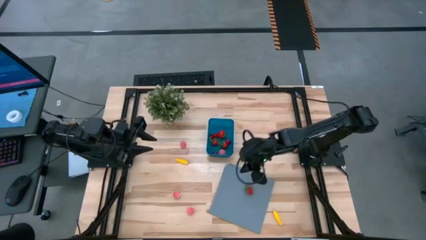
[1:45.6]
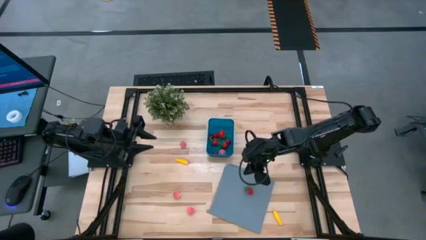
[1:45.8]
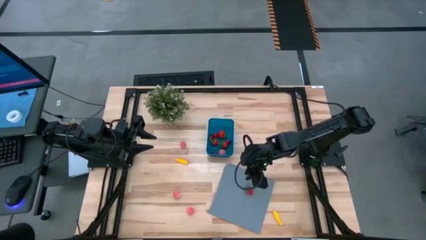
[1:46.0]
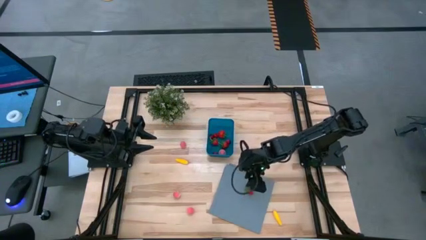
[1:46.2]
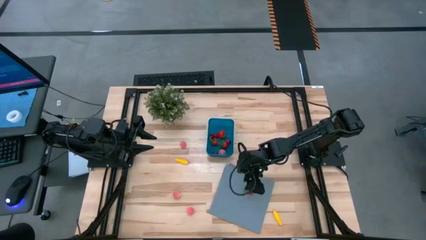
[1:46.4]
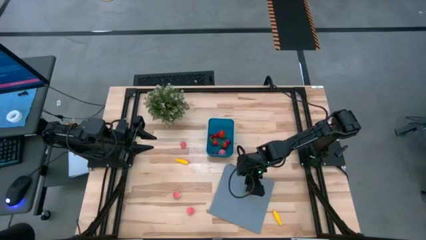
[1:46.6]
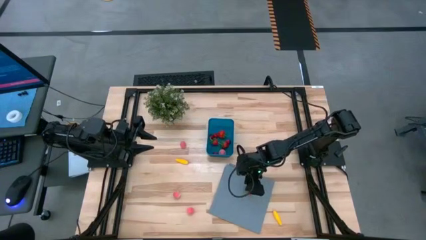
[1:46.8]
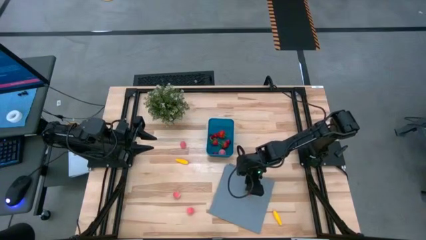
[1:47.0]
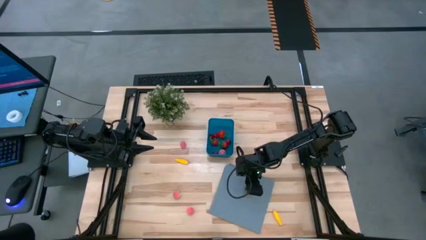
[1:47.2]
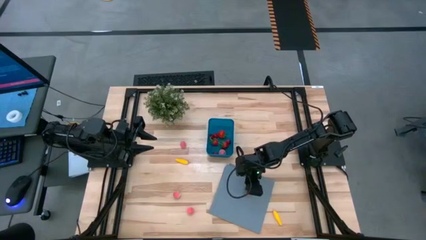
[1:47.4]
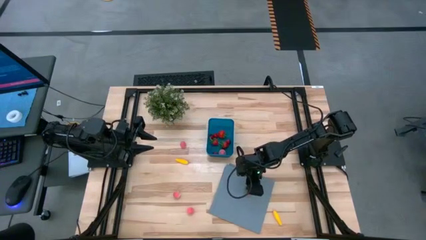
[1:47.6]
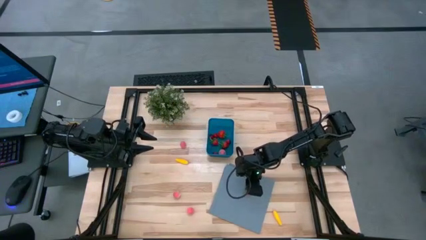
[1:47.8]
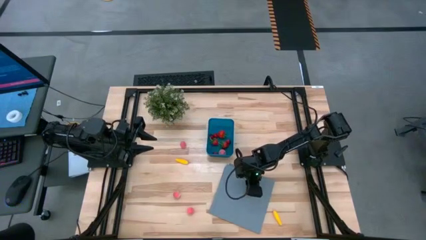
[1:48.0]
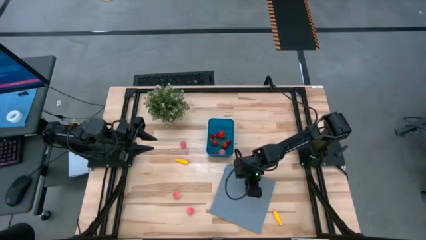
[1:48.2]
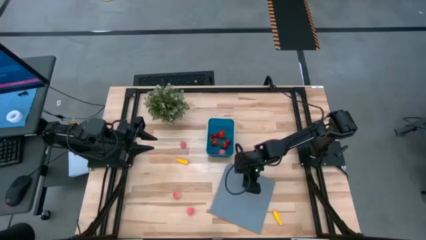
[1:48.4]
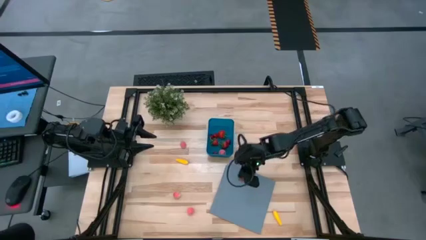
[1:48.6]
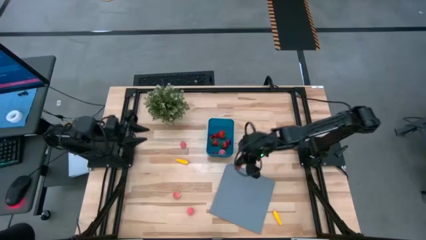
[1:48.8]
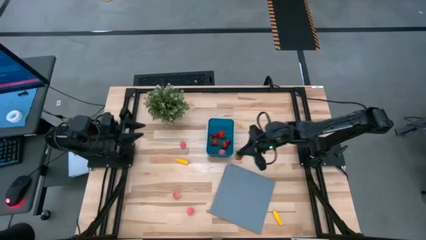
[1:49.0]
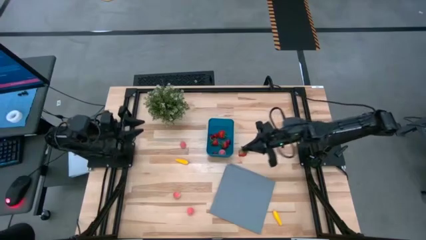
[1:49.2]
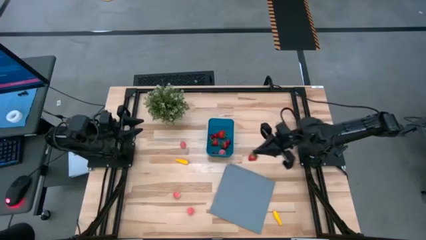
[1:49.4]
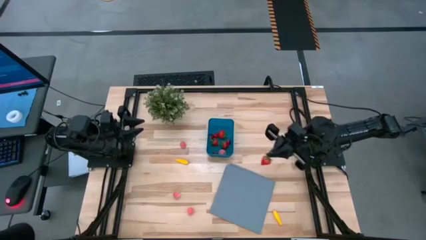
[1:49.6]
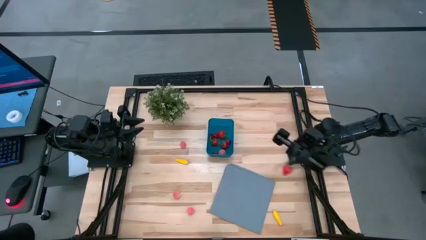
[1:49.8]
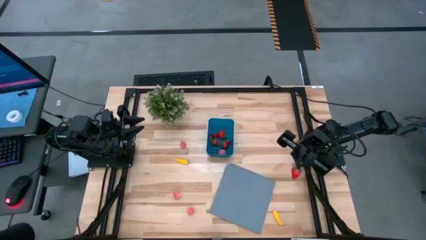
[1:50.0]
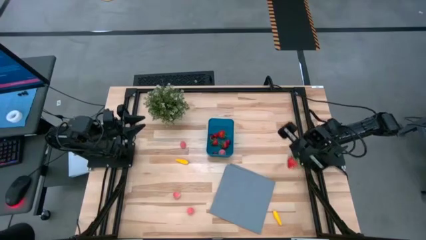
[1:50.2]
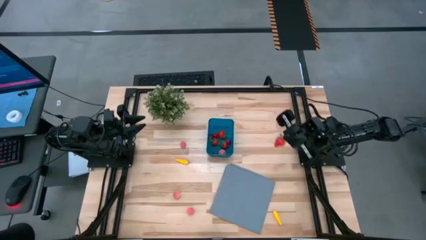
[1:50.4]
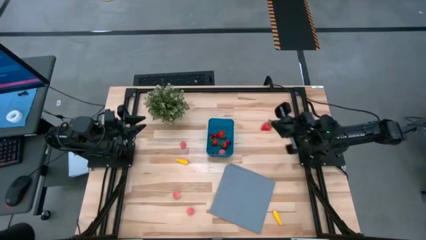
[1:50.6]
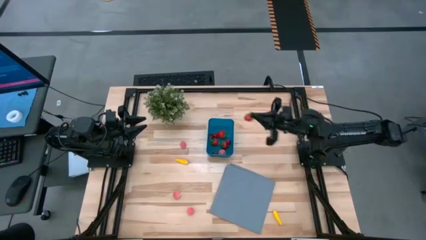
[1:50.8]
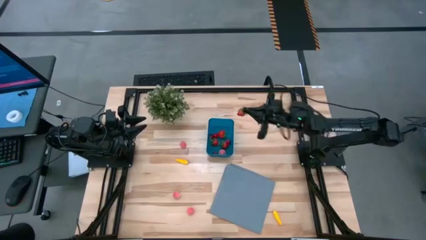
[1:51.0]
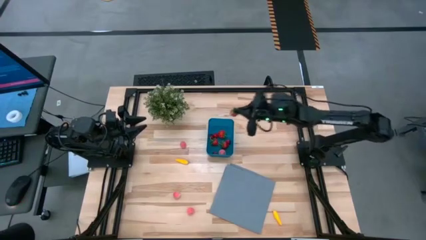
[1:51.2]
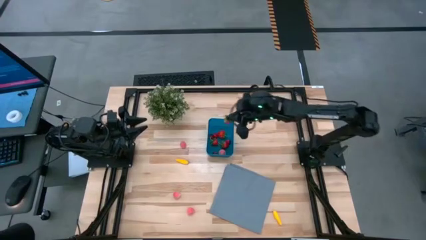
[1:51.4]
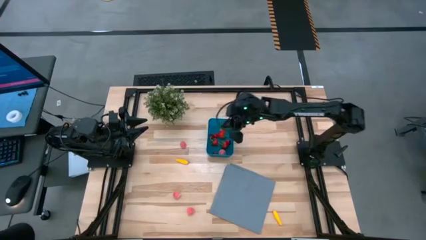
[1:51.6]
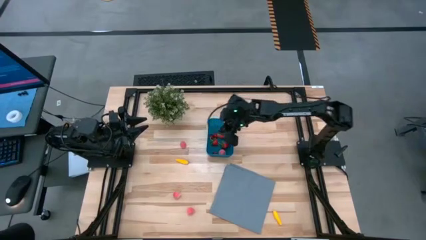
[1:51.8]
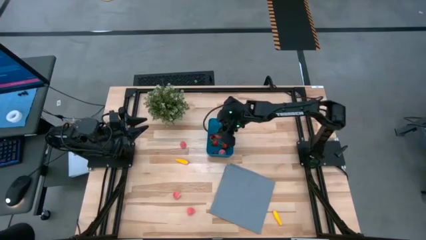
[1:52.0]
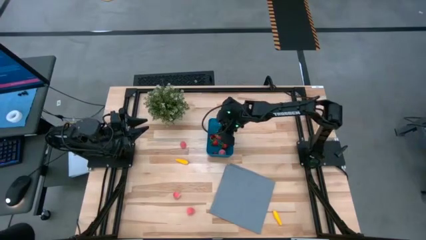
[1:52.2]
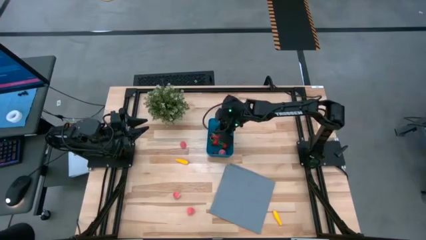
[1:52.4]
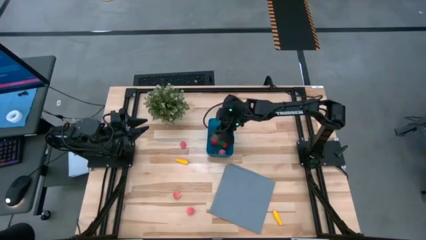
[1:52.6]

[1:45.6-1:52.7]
Task: Pick and placing Produce into tupperware
Put the strawberry into the blue bin

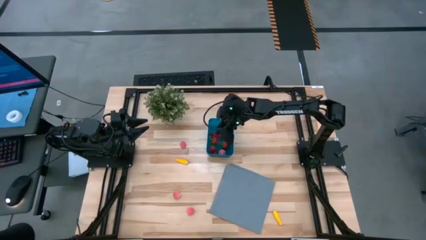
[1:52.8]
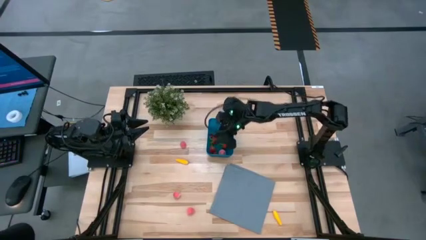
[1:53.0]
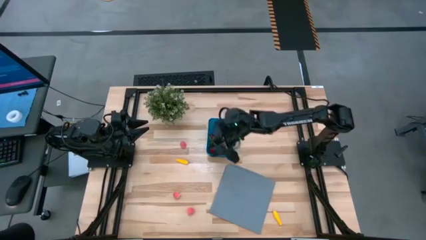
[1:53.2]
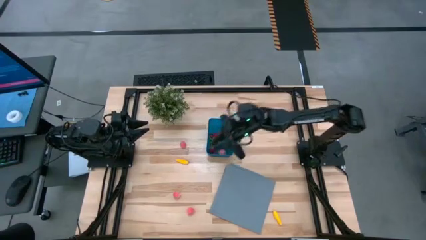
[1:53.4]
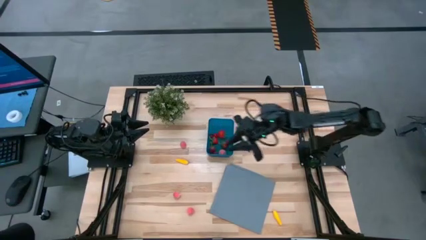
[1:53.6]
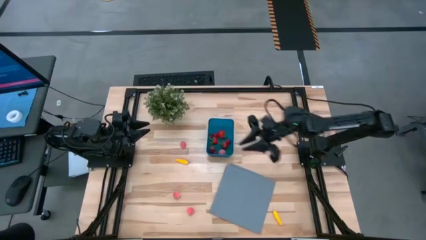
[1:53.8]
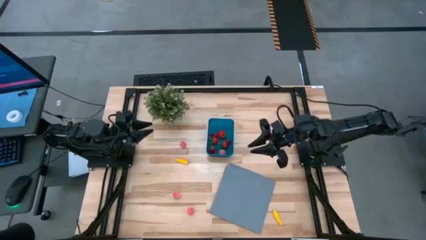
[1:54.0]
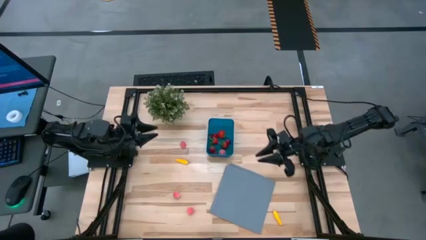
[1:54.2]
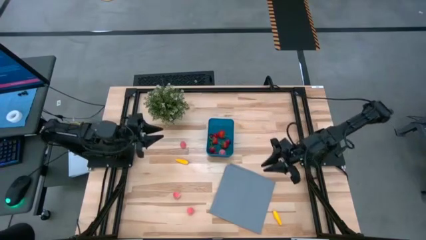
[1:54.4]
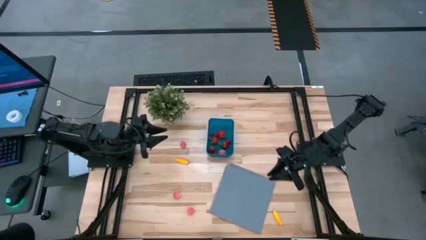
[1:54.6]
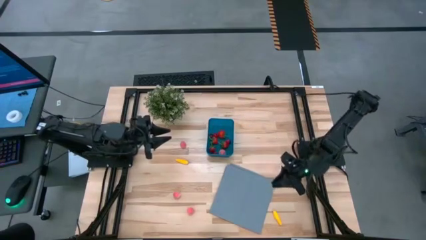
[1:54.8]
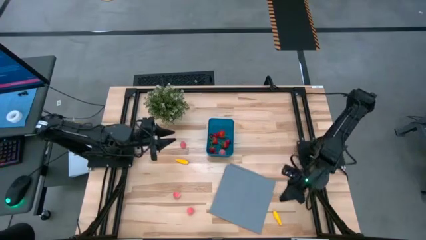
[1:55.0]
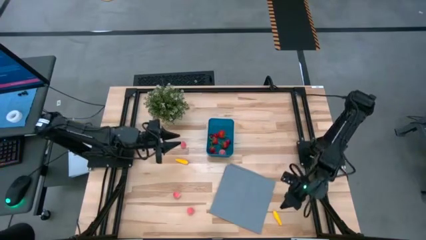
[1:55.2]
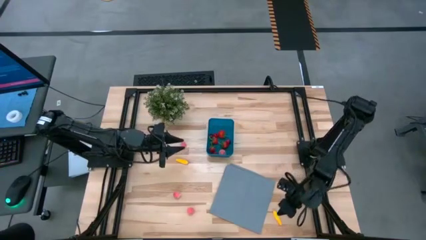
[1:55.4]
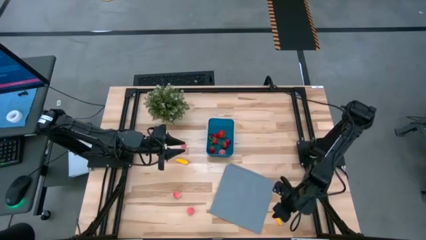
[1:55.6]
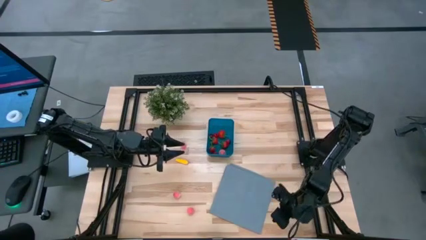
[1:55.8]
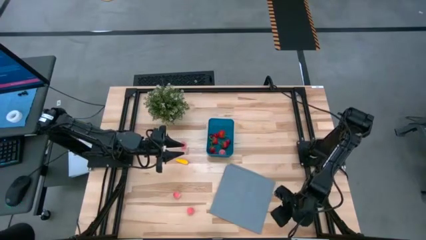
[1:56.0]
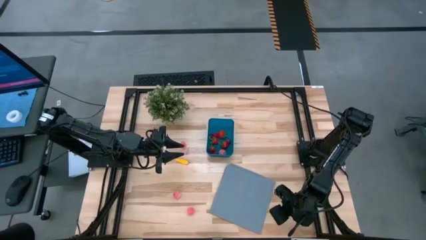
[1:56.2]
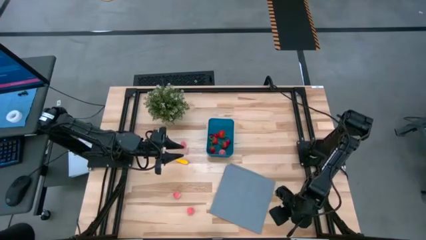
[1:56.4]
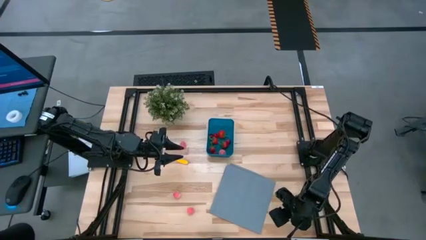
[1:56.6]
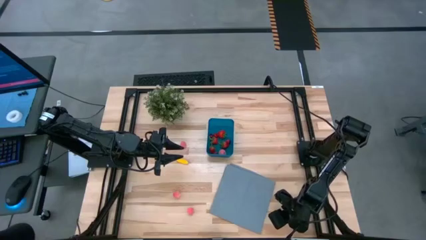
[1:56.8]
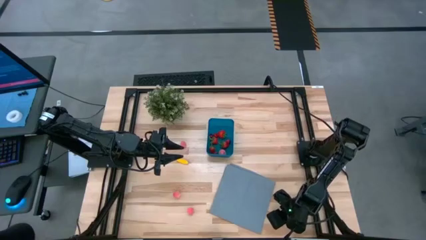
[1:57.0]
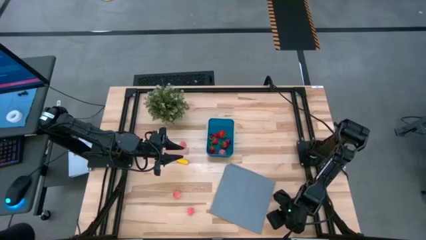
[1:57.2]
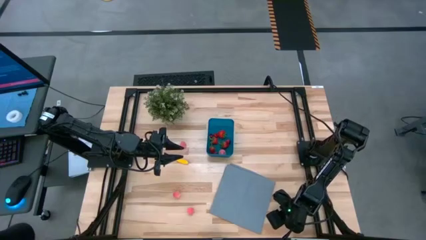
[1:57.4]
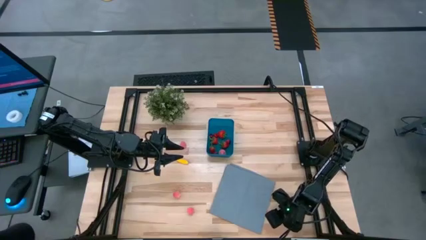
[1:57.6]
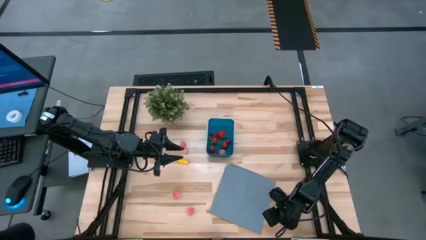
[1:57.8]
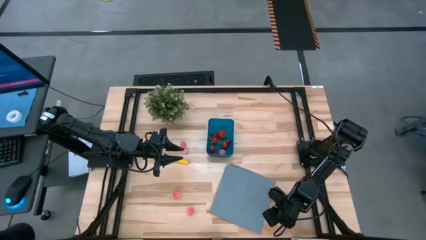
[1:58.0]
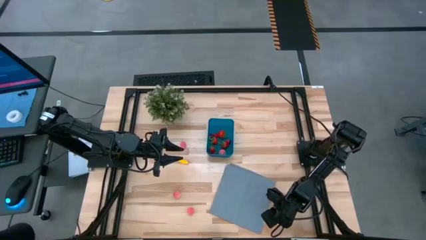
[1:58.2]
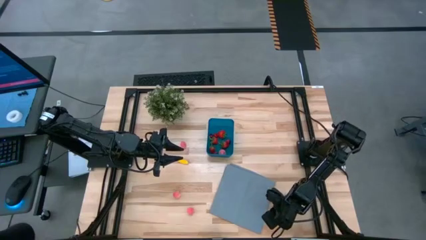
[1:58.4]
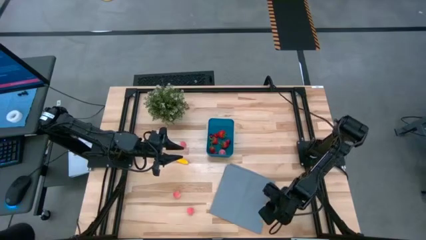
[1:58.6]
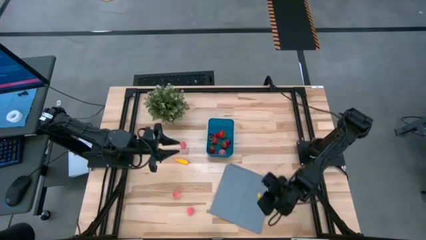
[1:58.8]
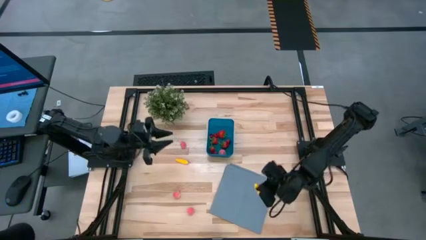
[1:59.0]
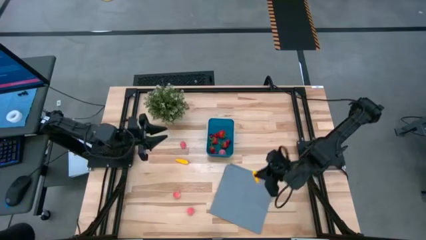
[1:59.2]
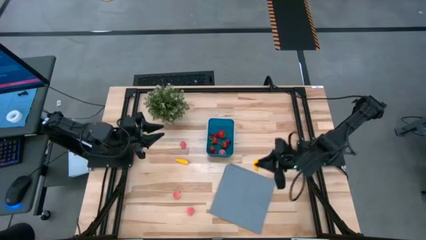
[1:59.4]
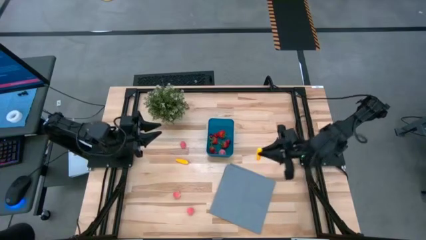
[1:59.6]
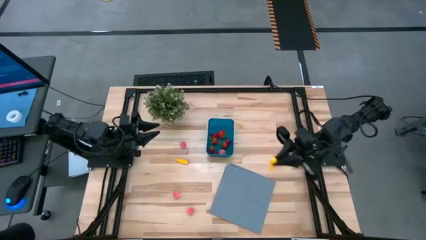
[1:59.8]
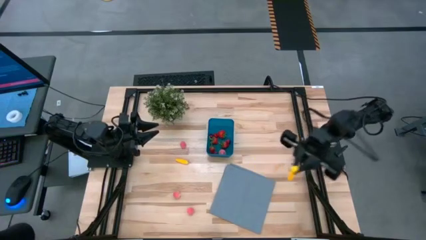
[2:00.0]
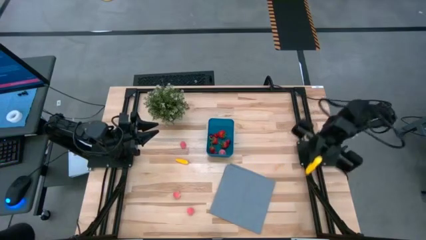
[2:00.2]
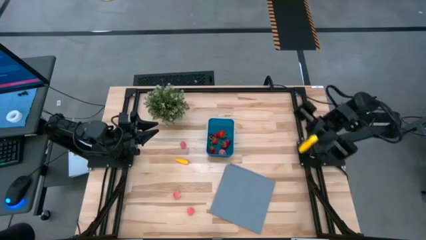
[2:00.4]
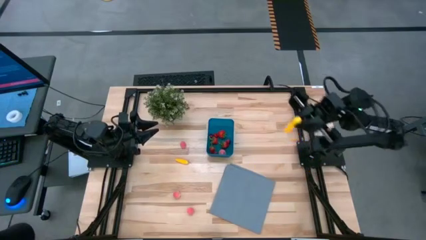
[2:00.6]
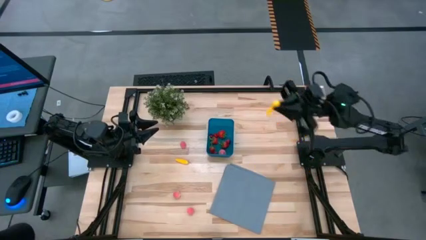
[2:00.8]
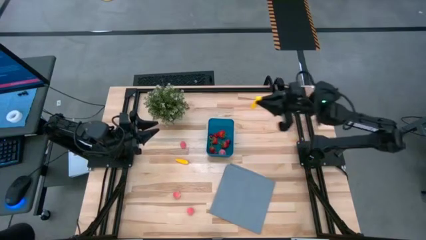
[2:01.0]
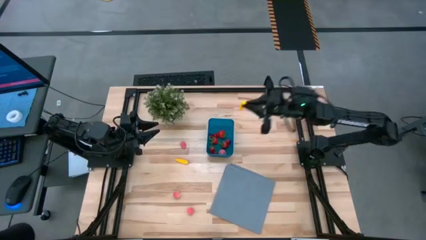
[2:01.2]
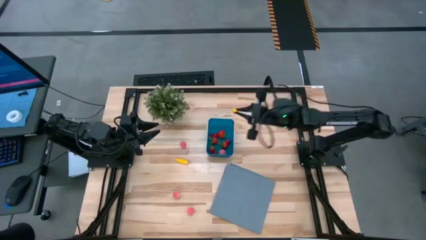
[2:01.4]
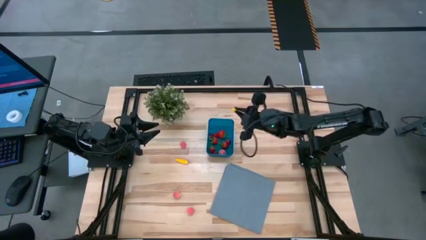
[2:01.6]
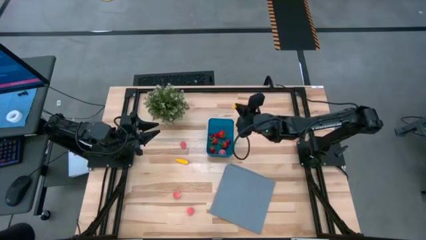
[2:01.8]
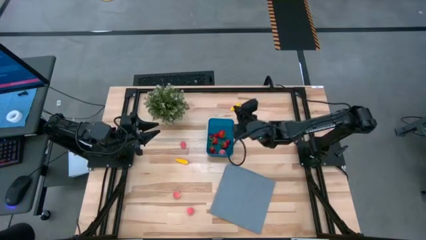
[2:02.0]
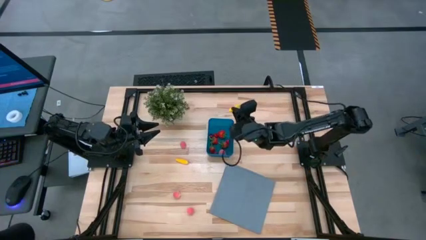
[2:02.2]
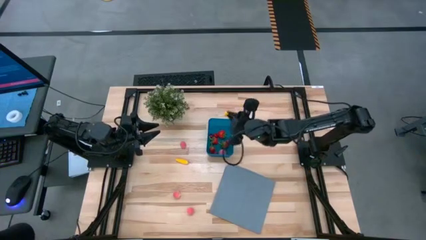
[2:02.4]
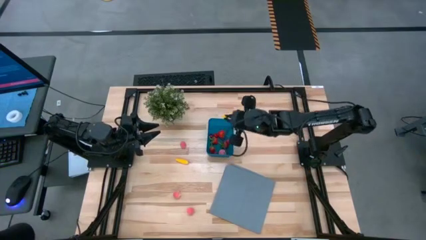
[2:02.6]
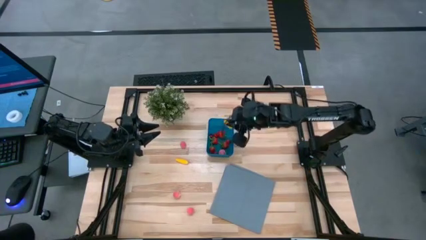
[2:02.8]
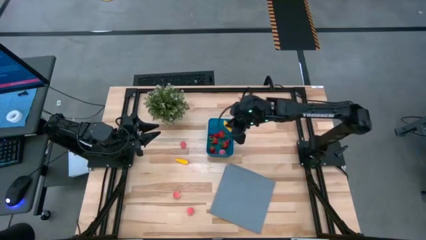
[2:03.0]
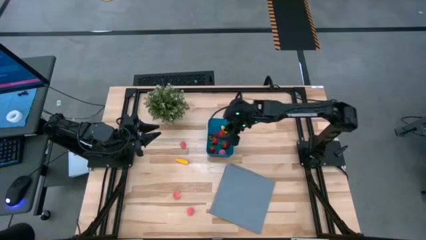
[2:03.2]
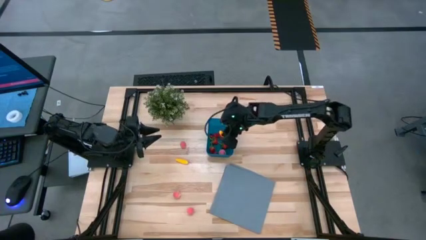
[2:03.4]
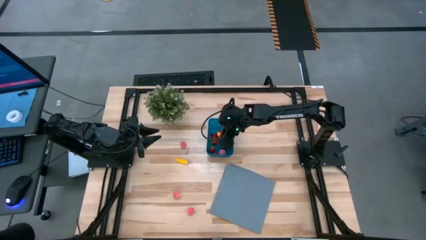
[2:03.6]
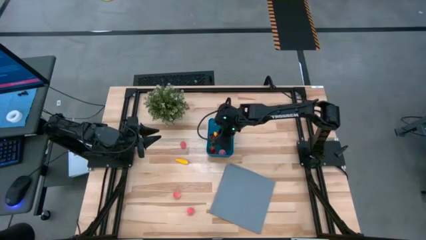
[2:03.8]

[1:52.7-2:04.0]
Put the corn into the blue bin
